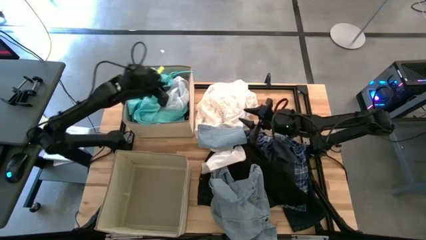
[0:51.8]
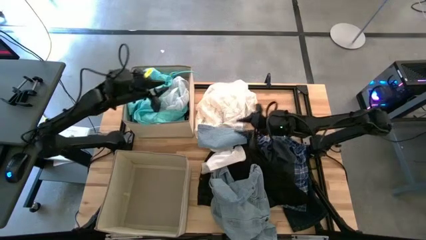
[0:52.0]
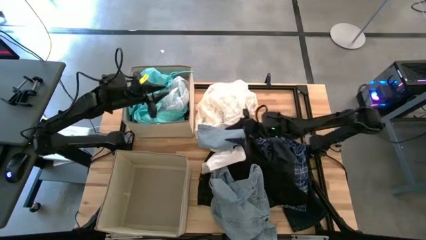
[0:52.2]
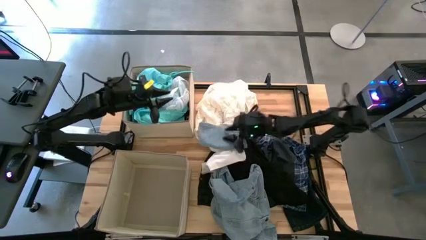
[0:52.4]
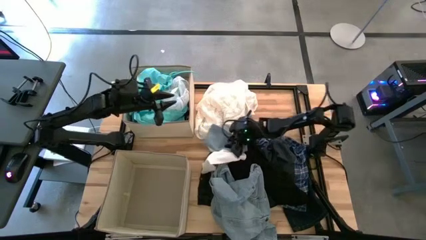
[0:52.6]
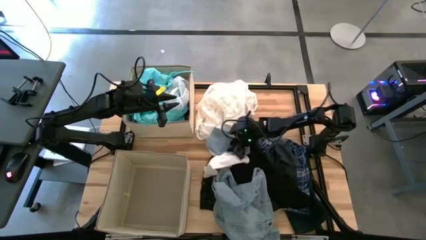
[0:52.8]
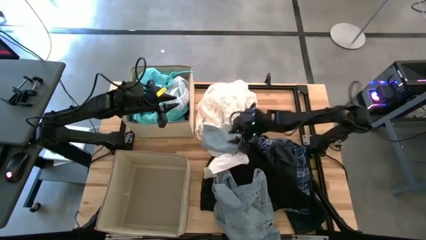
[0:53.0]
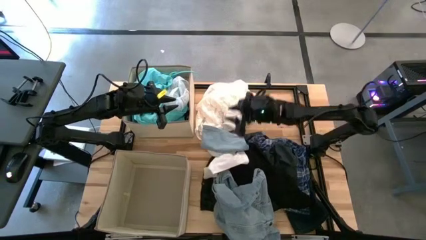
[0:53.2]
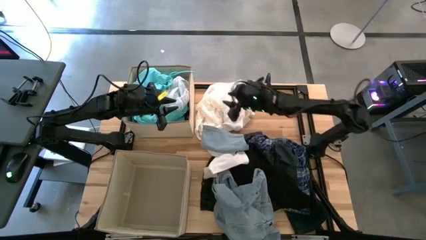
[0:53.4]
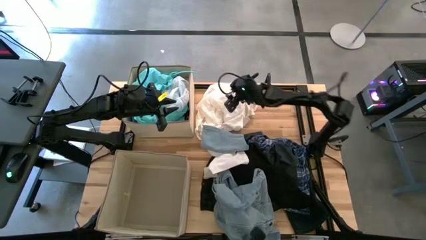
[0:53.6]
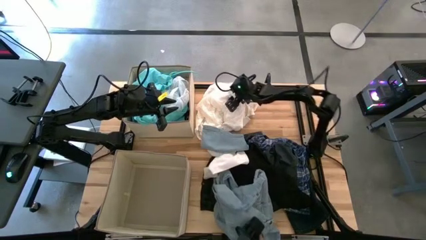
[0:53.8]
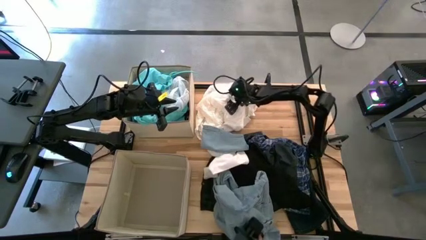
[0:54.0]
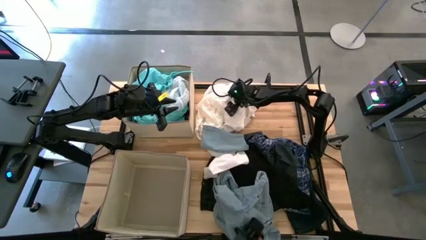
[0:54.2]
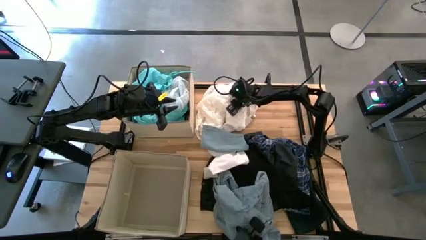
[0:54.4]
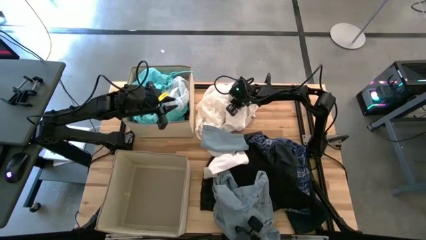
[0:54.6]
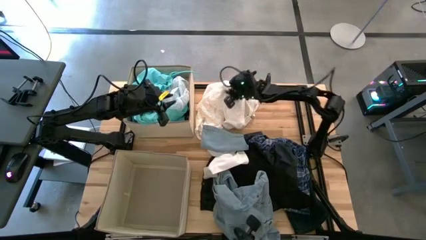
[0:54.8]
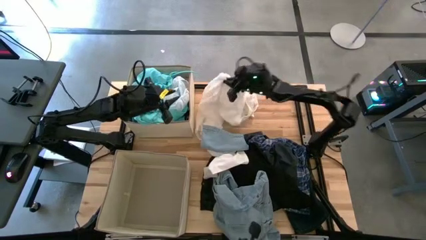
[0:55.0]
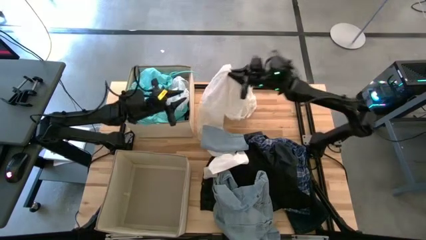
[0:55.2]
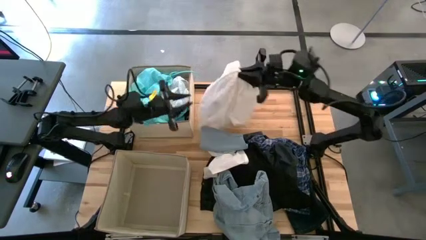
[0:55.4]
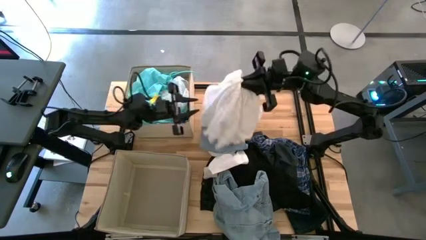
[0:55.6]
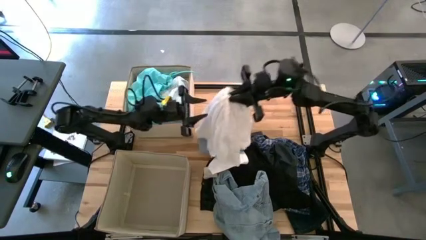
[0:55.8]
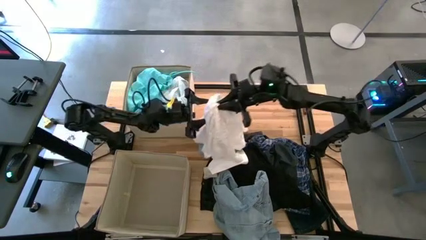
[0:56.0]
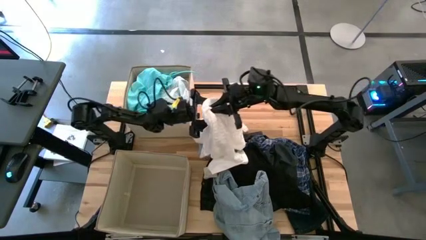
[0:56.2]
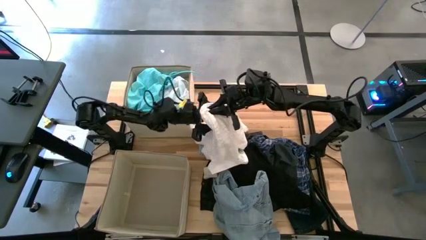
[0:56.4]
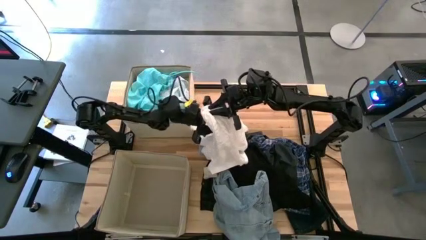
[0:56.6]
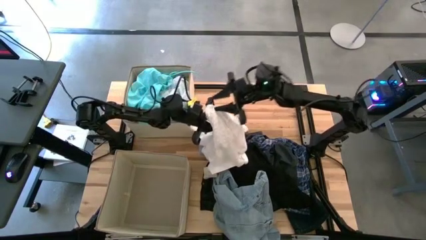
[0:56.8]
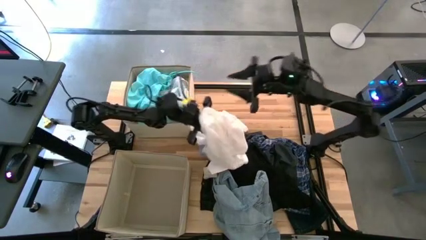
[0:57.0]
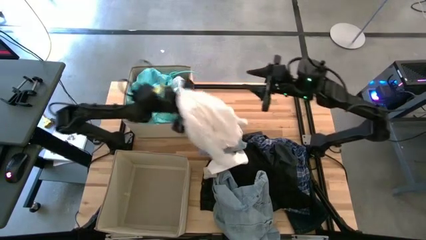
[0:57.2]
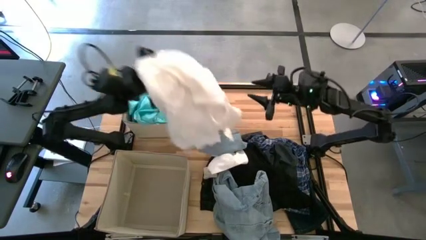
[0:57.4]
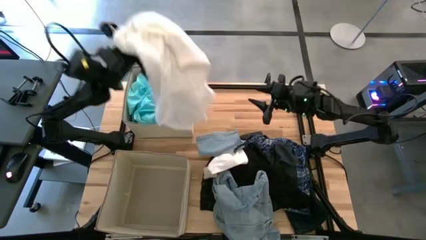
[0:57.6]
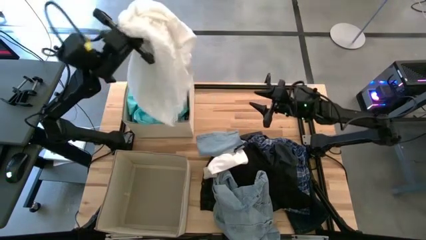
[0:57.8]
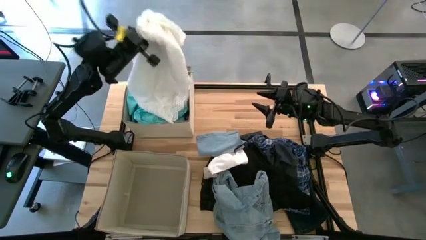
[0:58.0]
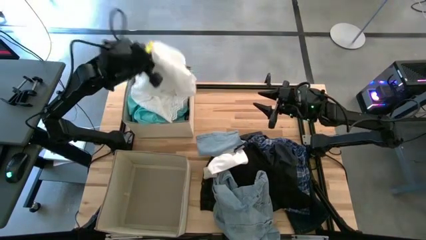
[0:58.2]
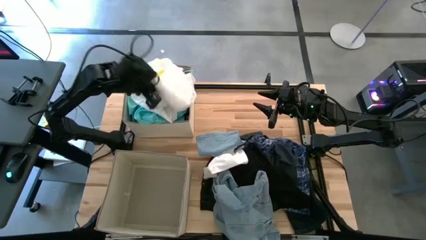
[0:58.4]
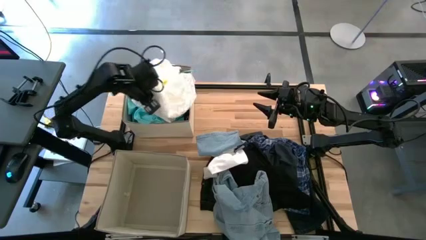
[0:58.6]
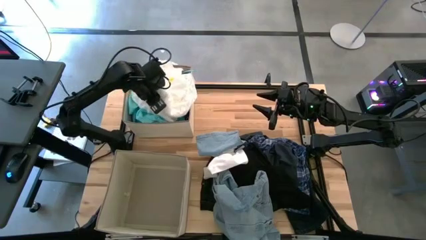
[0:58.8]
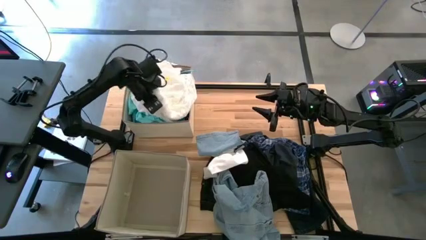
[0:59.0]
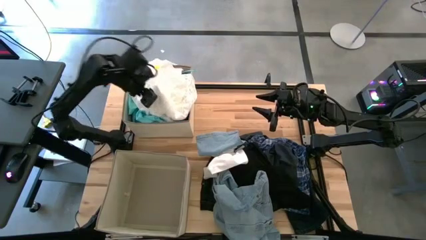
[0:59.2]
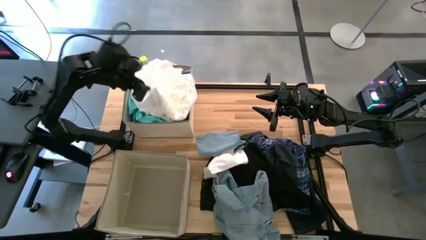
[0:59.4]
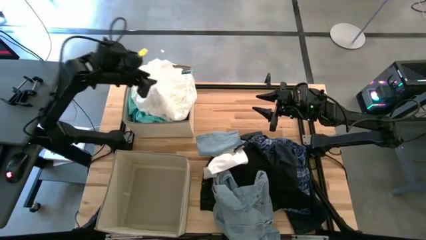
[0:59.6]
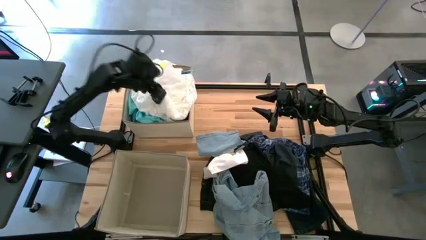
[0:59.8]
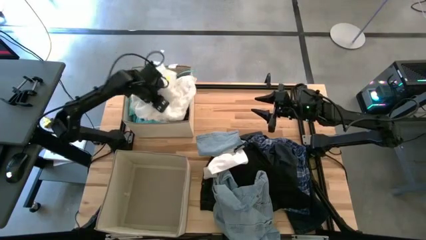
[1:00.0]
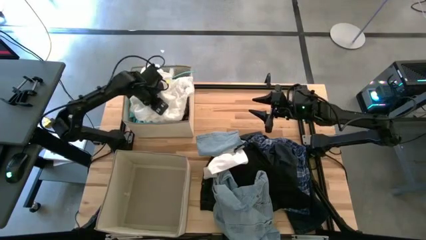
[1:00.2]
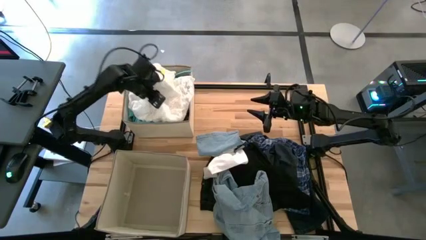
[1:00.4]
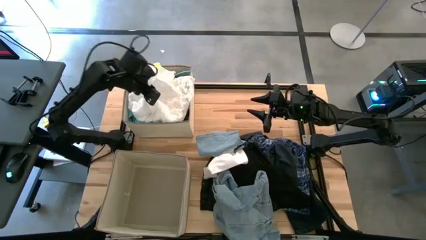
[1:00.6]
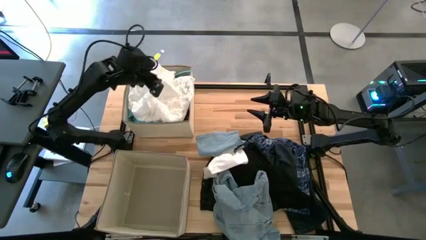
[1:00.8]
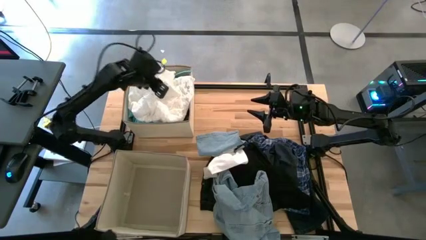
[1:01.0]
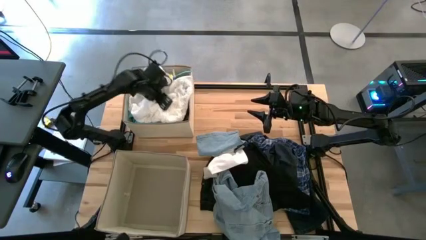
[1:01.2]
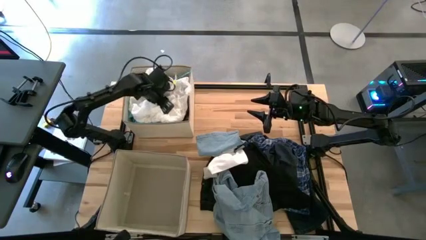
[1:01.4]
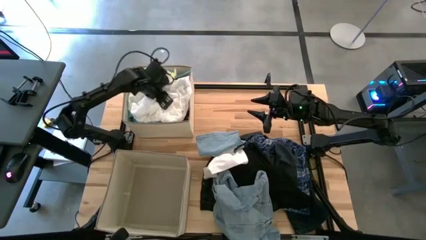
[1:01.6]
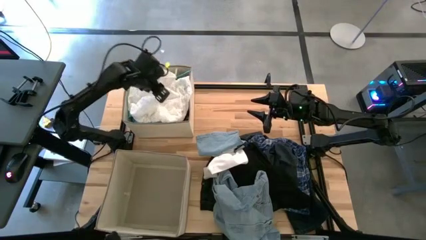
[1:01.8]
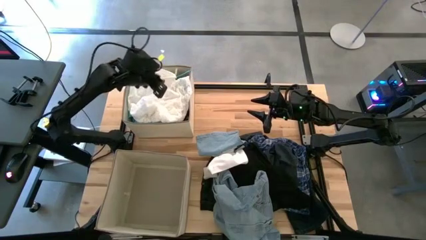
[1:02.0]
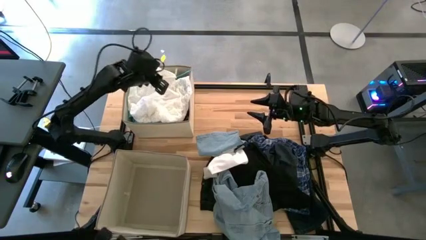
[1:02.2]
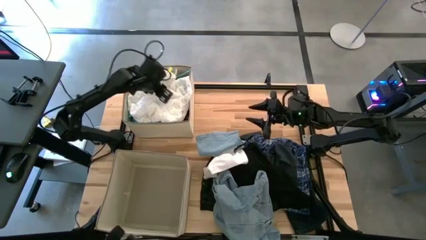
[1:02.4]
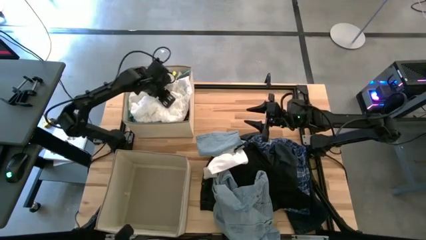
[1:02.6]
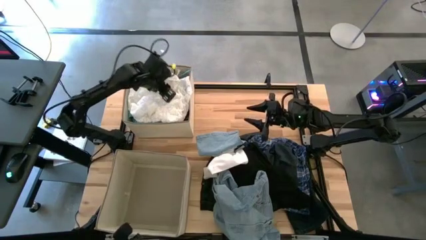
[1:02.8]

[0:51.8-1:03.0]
Task: Sort clothes
Put the white shirt into the top brown laundry organizer

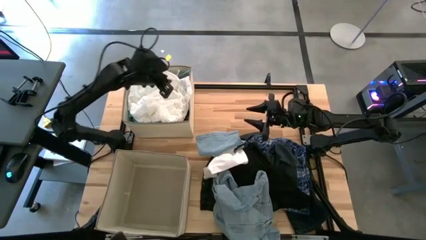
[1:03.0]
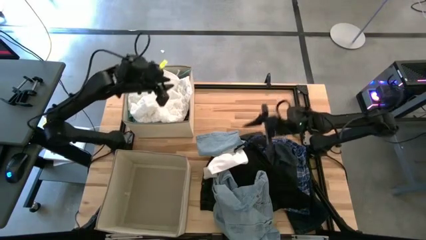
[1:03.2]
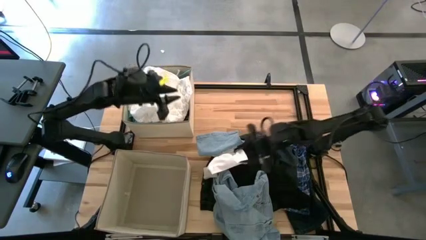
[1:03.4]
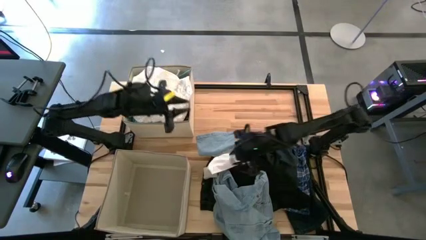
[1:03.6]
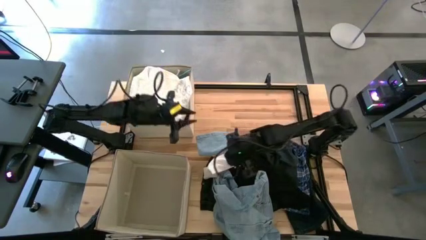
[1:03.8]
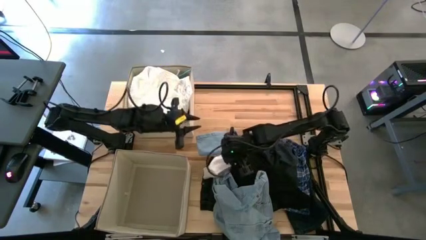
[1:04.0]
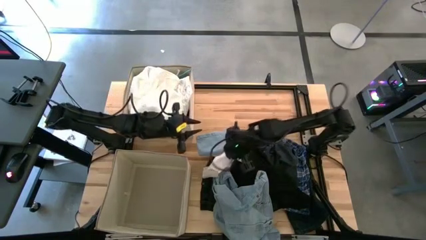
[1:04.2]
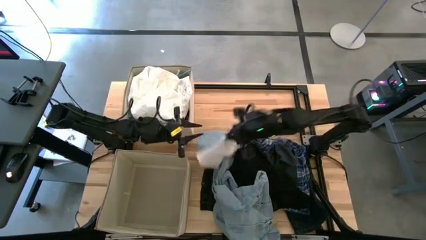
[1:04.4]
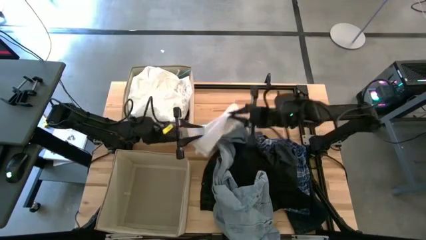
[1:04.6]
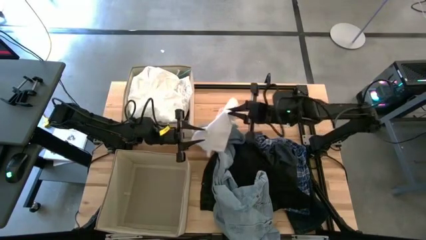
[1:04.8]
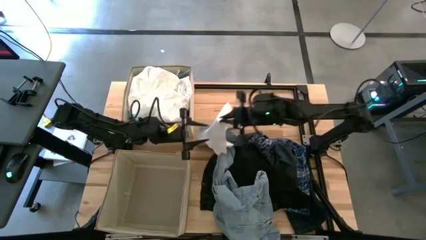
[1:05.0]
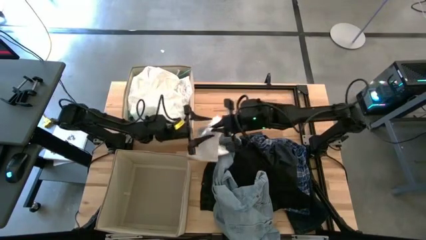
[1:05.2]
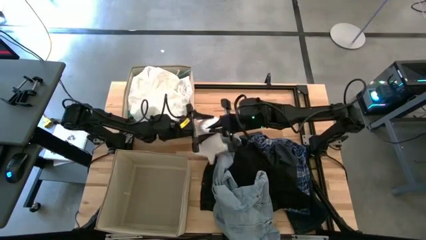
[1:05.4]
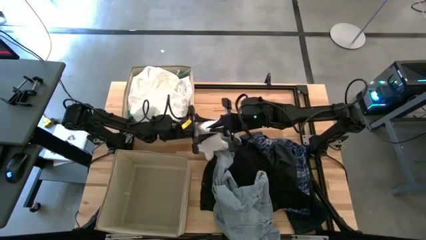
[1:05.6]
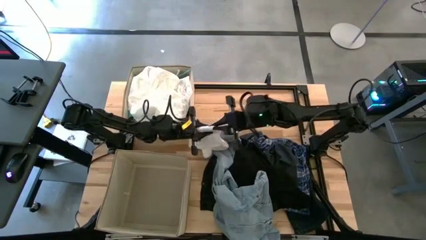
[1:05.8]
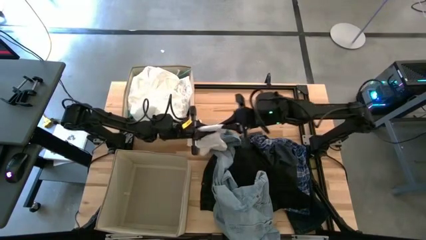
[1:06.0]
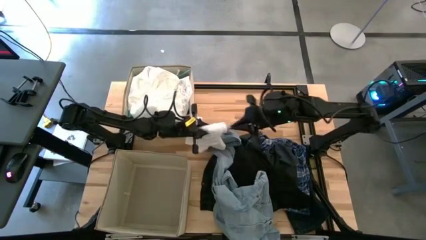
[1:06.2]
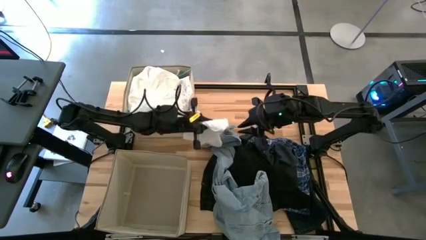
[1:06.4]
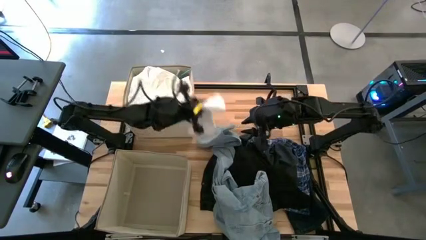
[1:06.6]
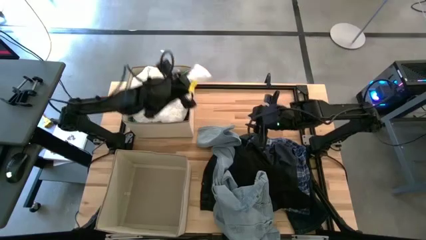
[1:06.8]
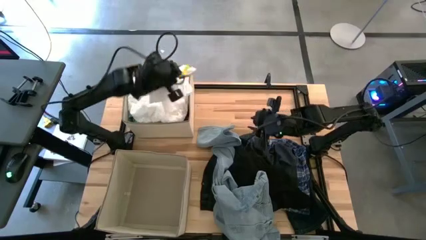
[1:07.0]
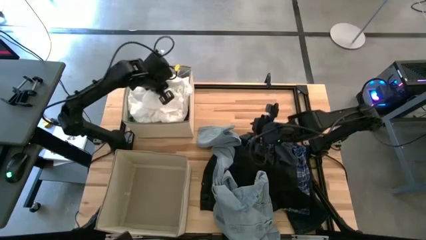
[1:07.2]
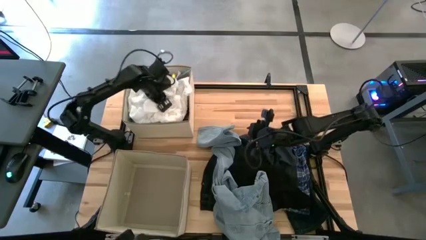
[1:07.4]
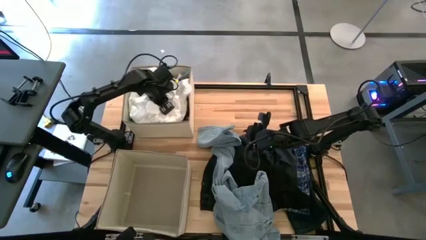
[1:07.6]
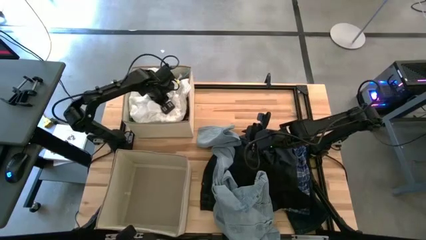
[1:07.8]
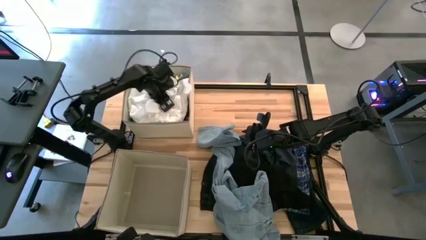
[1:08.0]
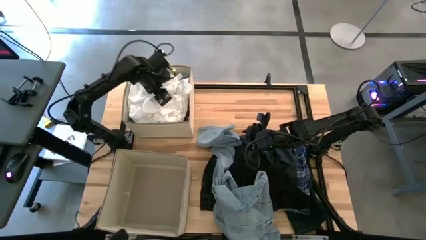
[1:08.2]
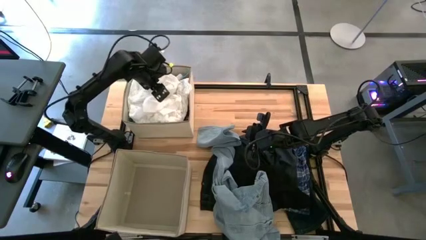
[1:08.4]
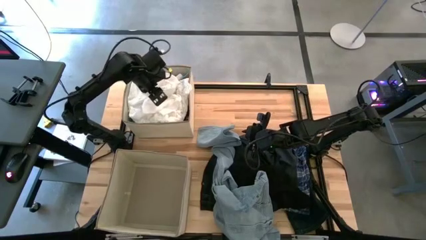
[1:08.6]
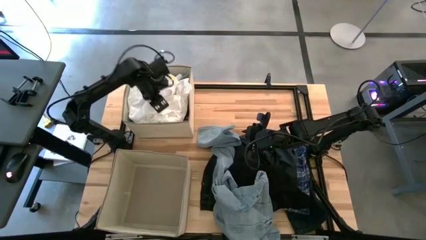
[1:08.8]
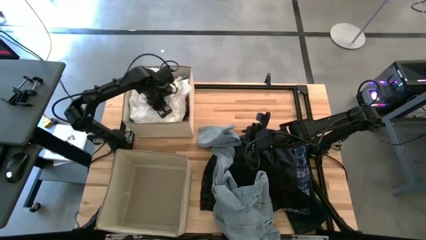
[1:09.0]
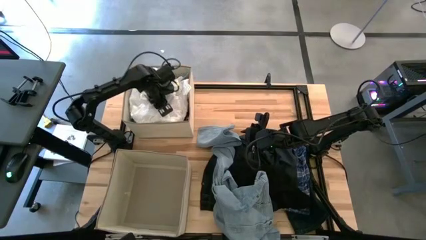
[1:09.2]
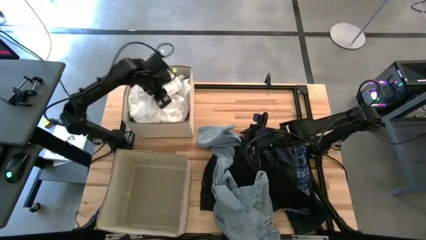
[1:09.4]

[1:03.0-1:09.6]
Put the white underwear into the top brown laundry organizer
